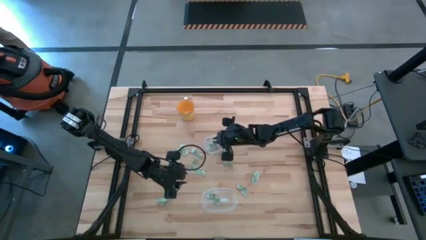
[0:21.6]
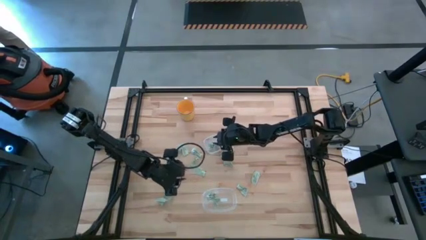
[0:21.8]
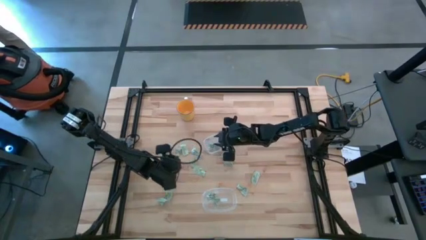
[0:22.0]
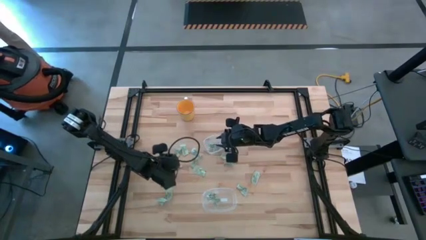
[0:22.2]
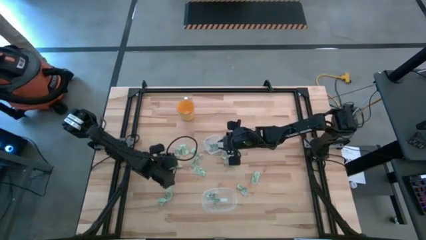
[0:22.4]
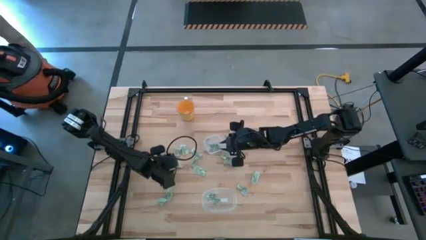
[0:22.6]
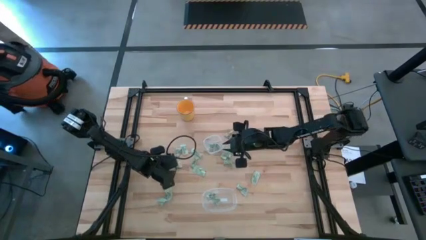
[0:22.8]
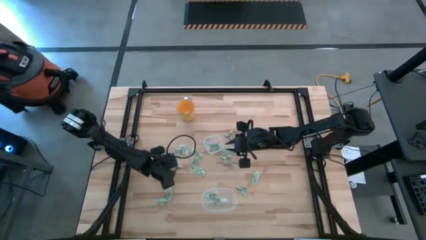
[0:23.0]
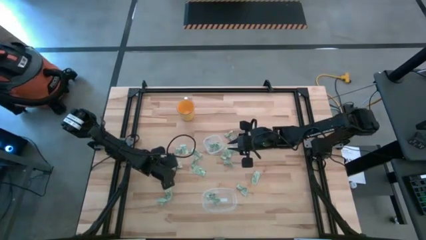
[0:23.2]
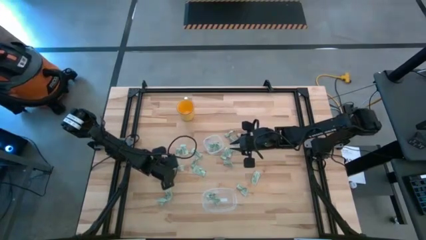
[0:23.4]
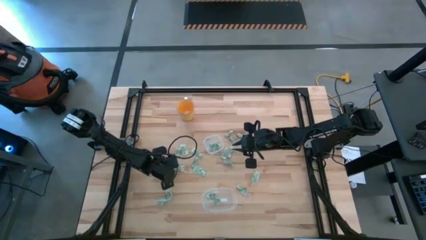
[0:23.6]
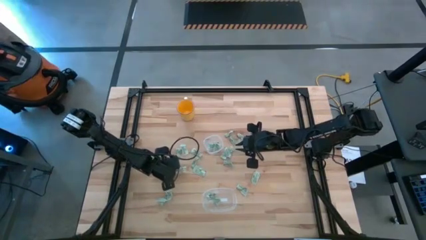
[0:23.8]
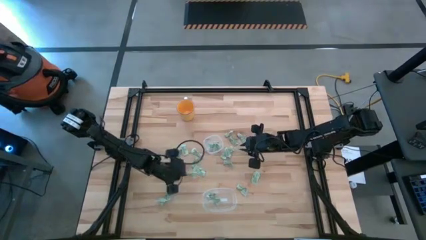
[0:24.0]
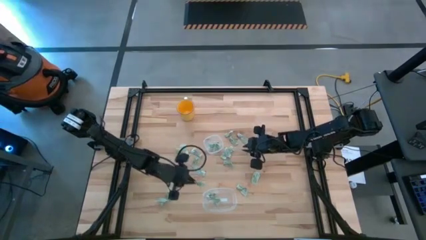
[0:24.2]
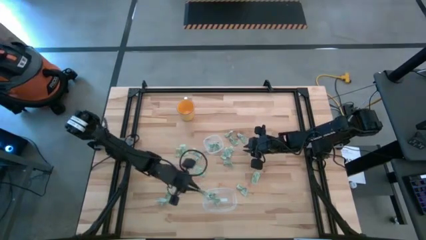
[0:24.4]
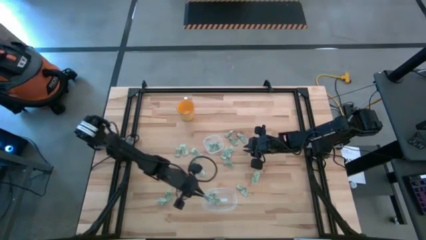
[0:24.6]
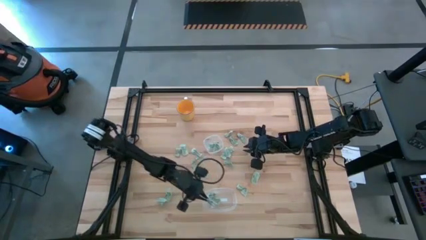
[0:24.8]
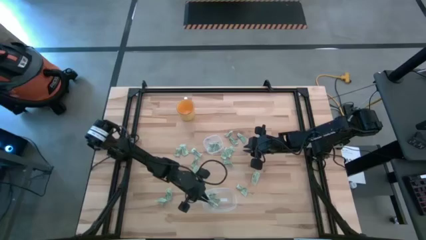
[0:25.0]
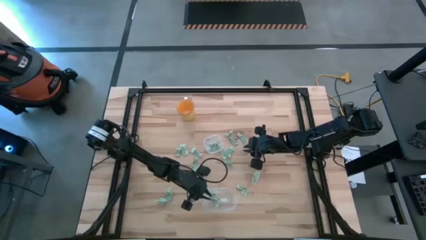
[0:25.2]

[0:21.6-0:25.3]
Put the white stevia packet into the bottom transparent bin

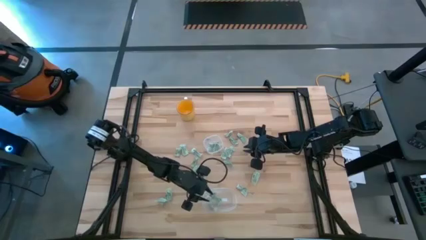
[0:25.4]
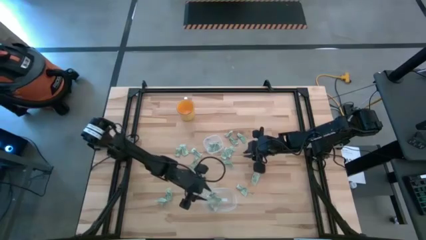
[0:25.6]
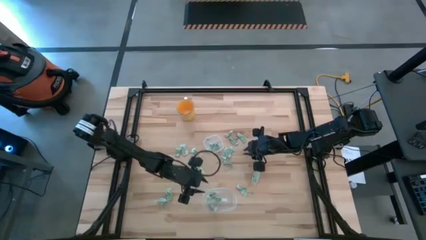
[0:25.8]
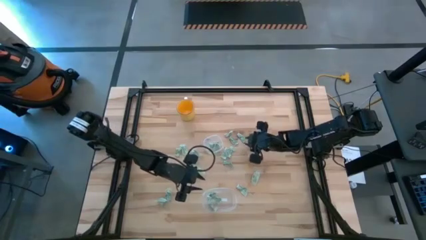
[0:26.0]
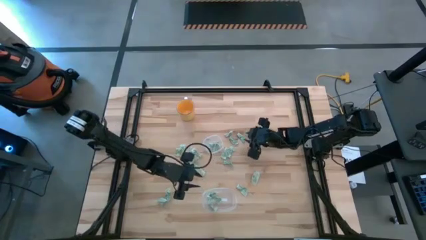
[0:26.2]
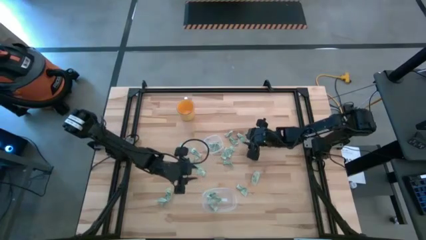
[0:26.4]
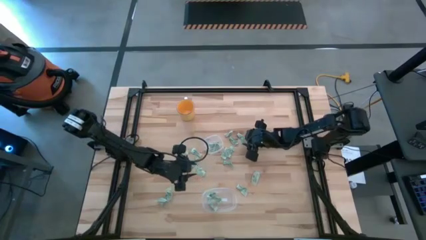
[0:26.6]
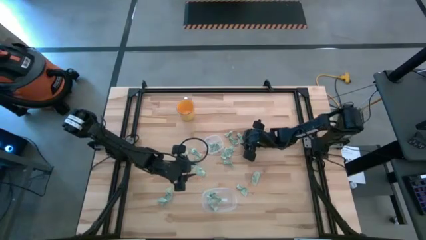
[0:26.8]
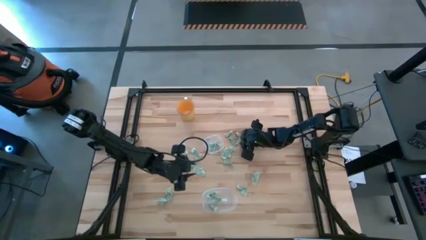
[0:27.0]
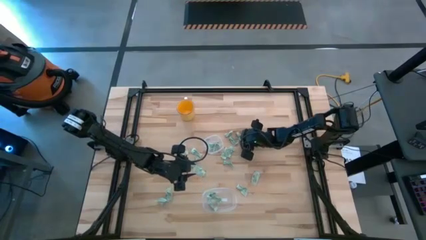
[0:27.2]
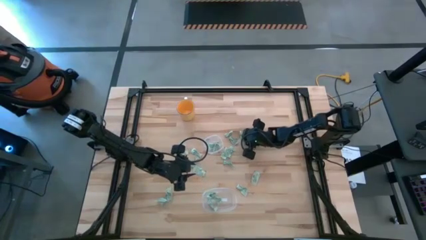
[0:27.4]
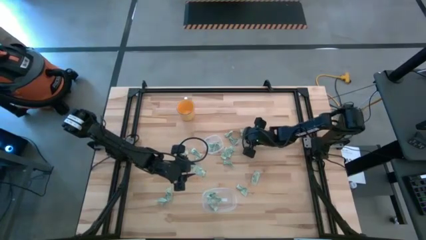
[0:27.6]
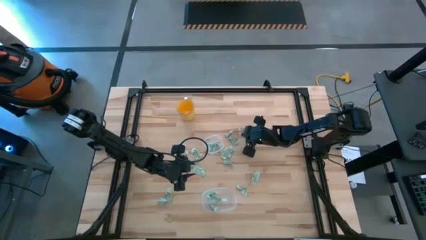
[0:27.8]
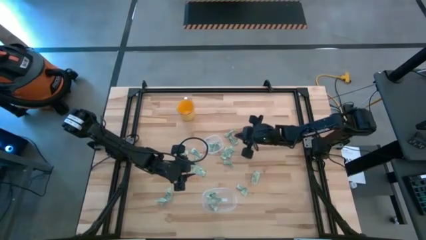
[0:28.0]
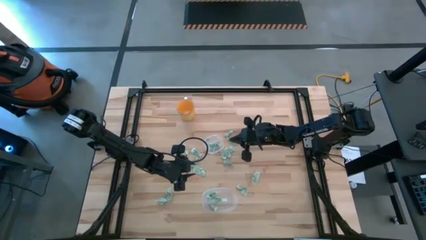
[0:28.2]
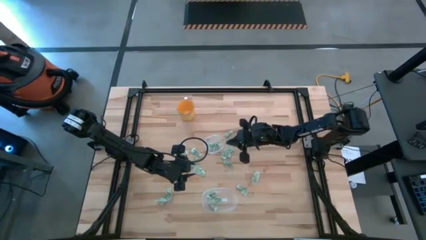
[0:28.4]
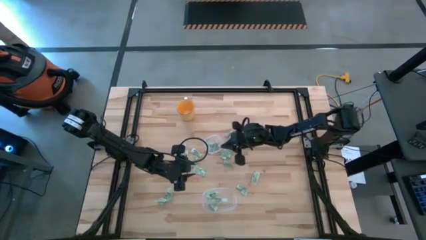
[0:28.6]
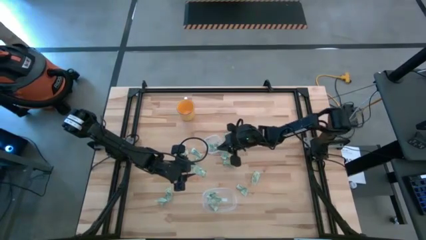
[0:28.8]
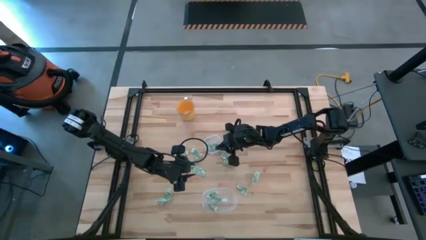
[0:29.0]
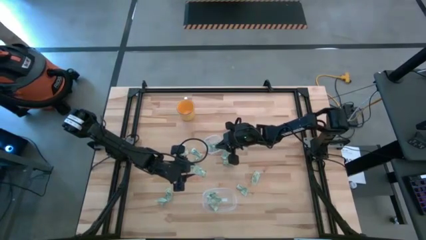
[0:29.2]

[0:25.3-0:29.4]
Put the white stevia packet into the top transparent bin

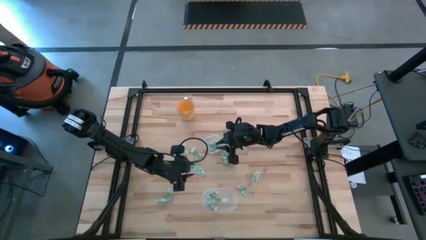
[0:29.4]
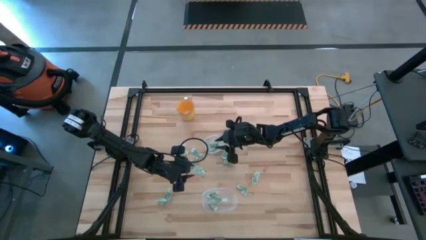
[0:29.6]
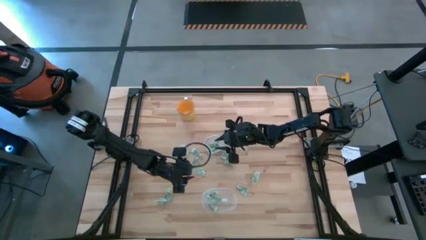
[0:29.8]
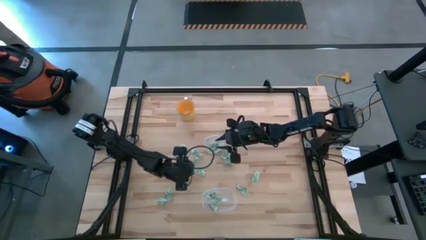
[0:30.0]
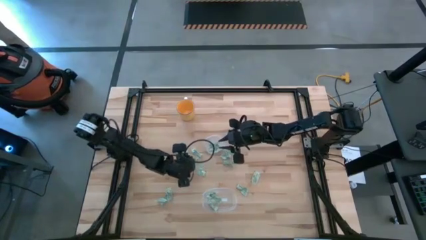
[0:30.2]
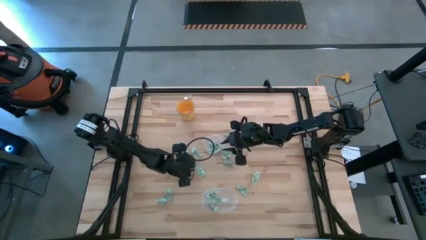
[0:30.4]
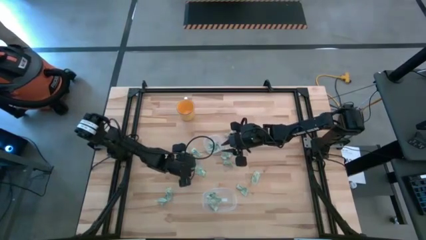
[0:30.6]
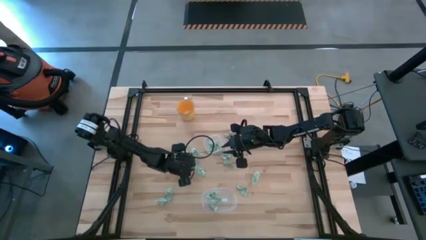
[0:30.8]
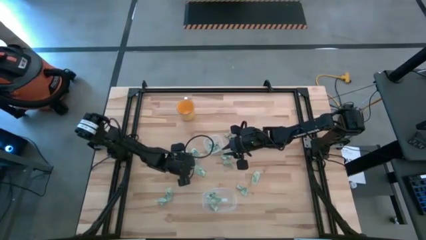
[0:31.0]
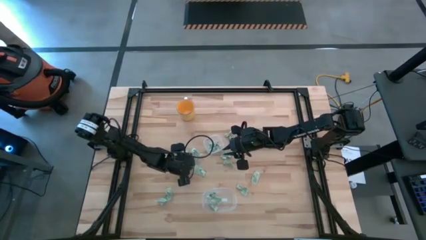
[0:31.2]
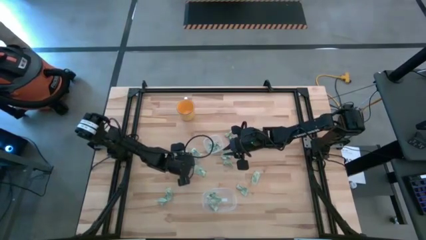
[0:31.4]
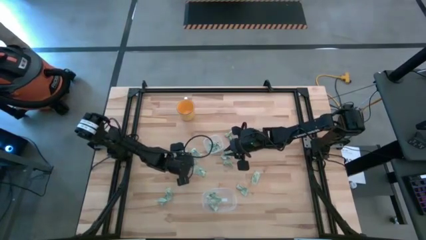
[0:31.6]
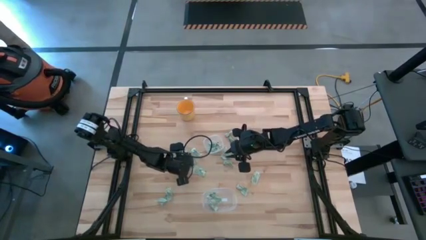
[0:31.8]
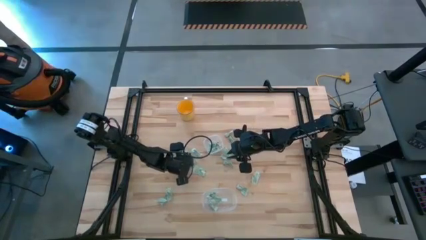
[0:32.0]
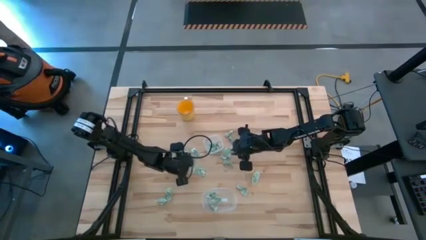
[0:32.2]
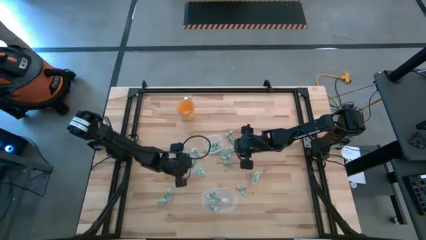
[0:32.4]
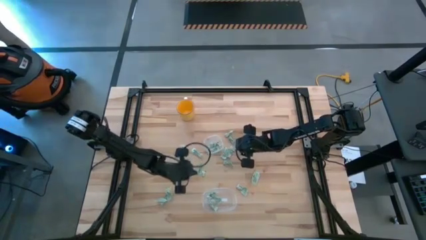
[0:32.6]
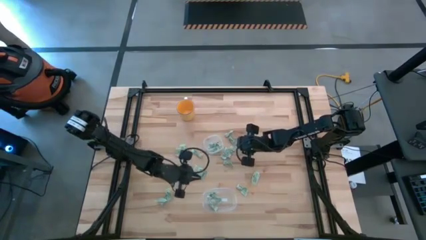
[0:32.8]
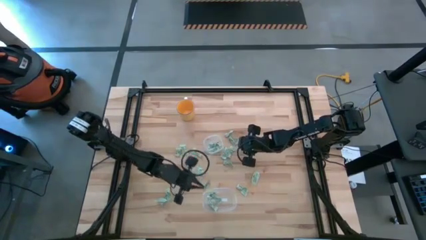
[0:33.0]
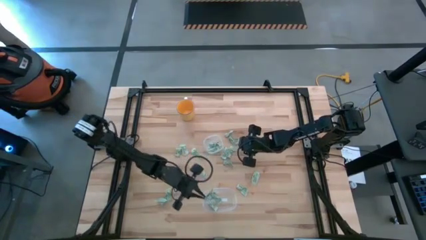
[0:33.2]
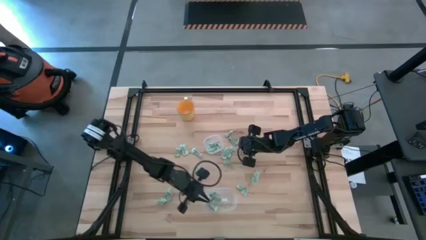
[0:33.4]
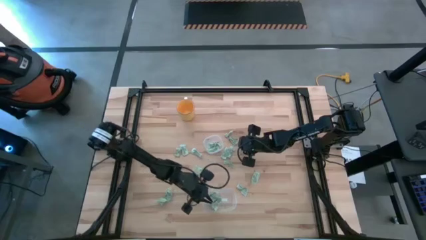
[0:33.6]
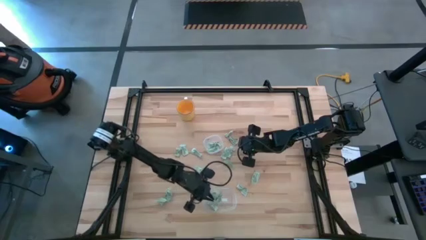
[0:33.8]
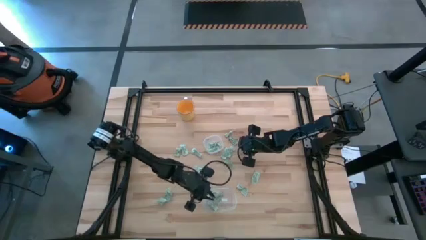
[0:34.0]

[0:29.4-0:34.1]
Put the white stevia packet into the bottom transparent bin

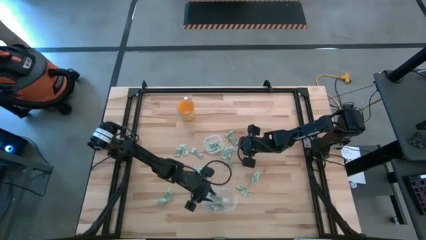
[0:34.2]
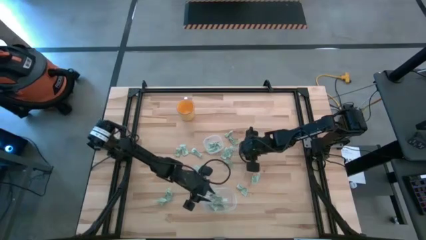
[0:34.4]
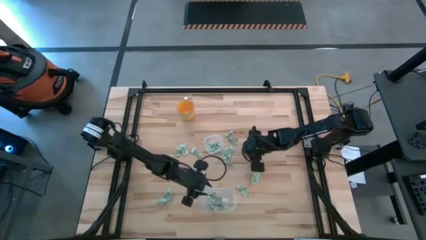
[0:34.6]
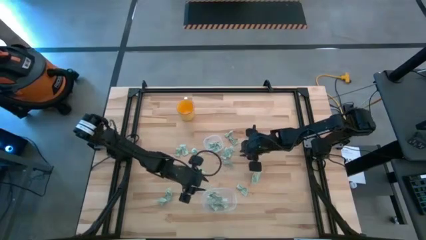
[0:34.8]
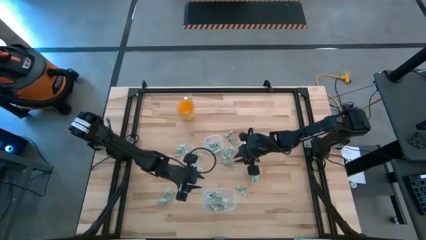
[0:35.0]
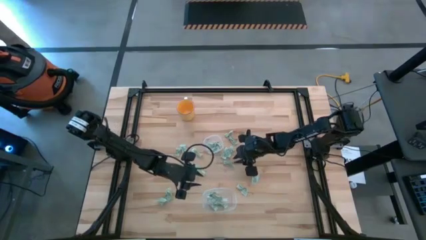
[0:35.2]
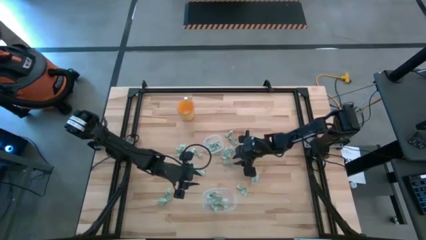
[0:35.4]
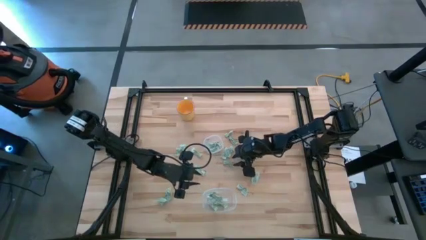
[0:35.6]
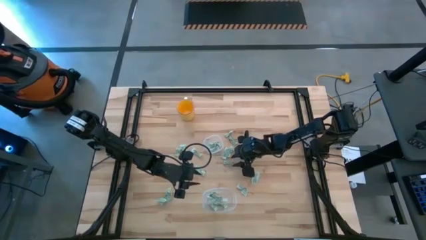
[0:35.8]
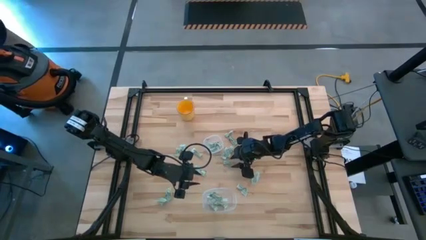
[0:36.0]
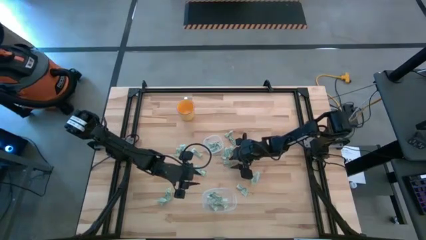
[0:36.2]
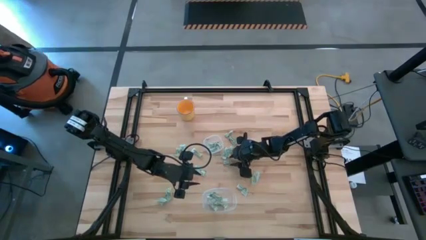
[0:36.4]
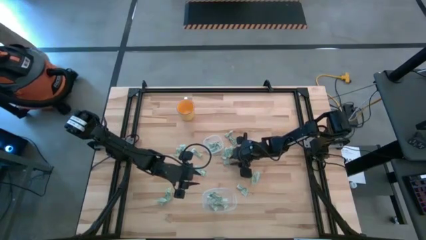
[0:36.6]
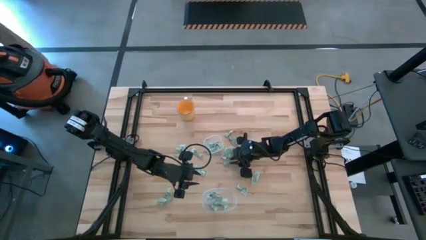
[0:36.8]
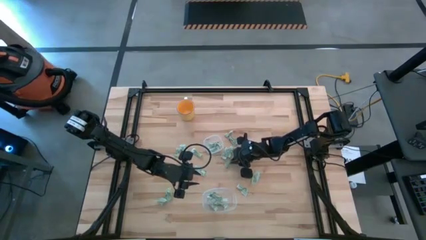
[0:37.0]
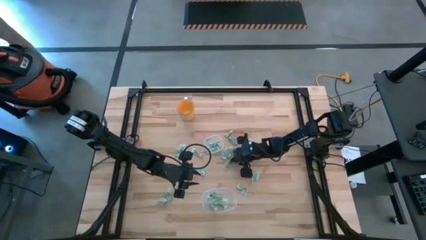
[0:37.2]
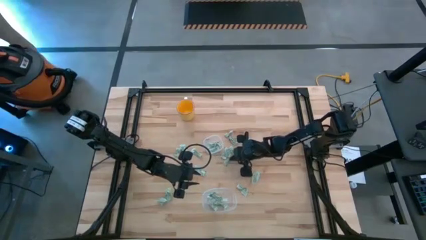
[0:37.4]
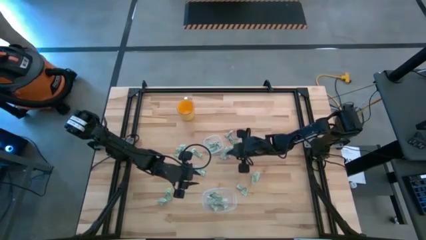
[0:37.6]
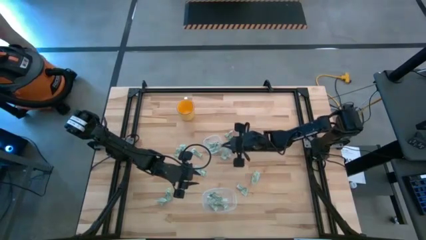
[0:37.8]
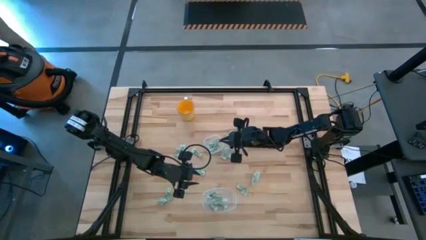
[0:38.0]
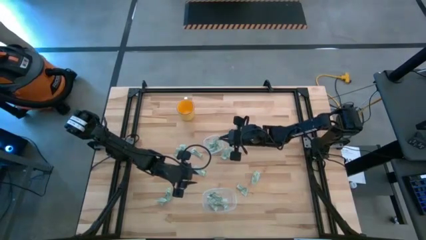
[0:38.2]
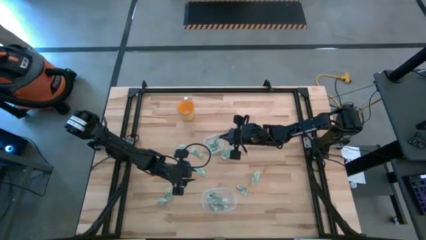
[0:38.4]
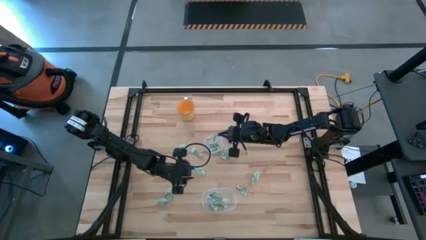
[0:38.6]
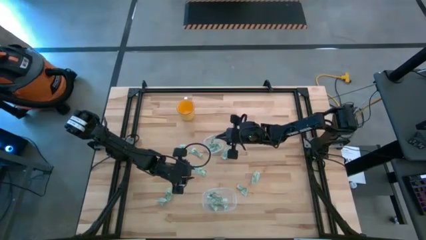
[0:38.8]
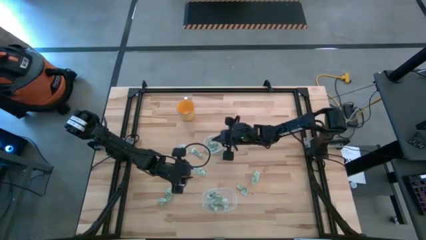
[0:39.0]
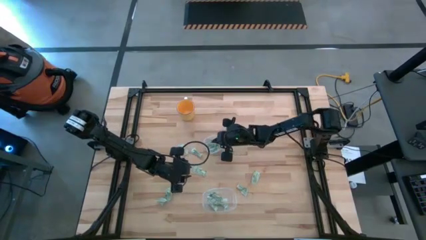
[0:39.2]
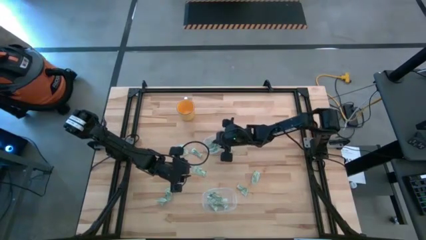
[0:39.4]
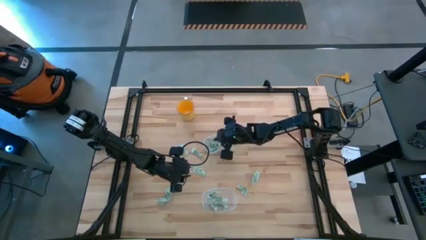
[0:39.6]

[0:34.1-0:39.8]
Put the white stevia packet into the top transparent bin
